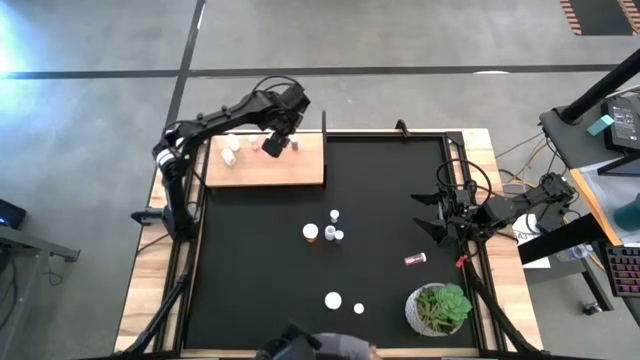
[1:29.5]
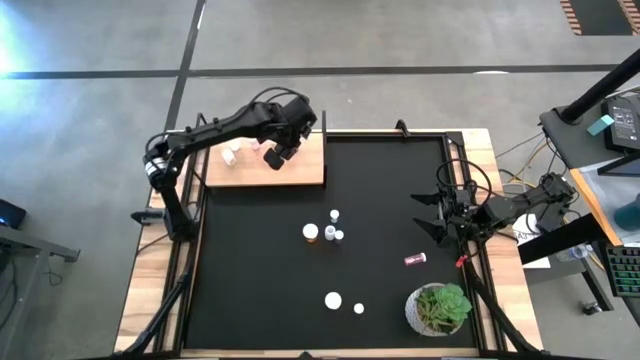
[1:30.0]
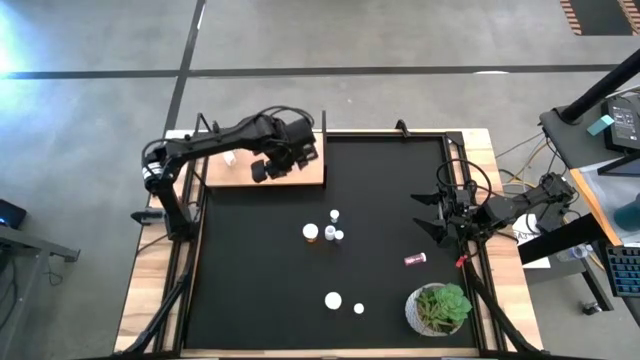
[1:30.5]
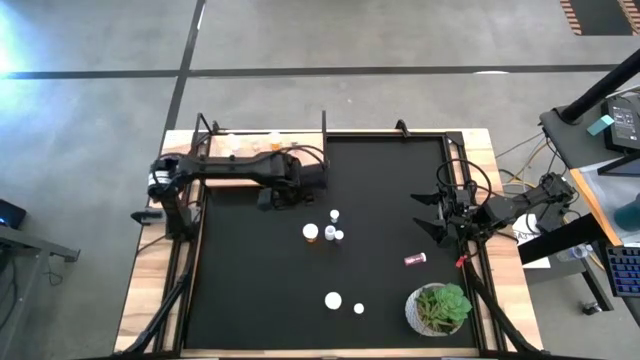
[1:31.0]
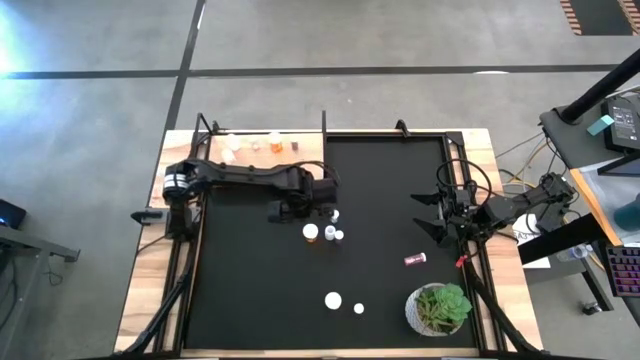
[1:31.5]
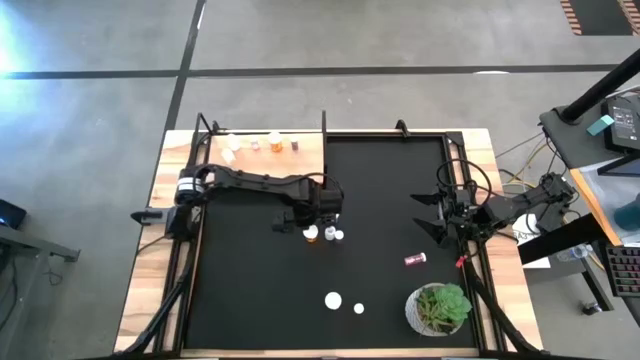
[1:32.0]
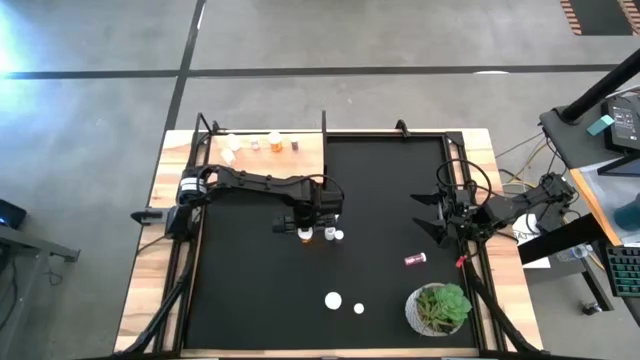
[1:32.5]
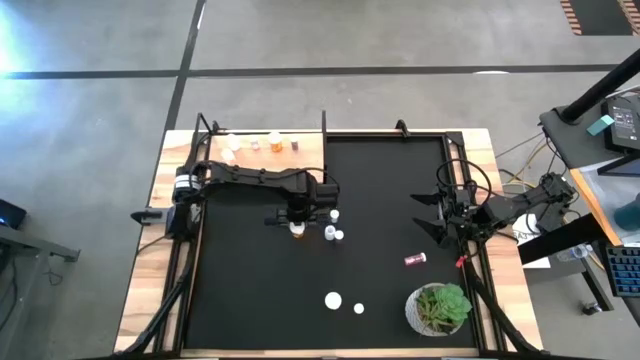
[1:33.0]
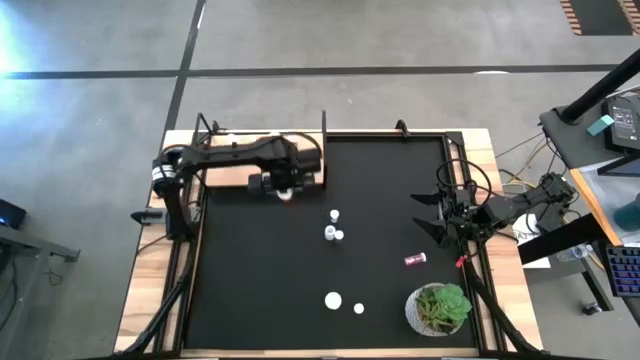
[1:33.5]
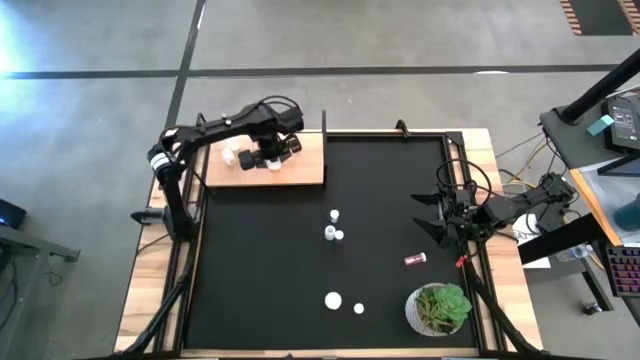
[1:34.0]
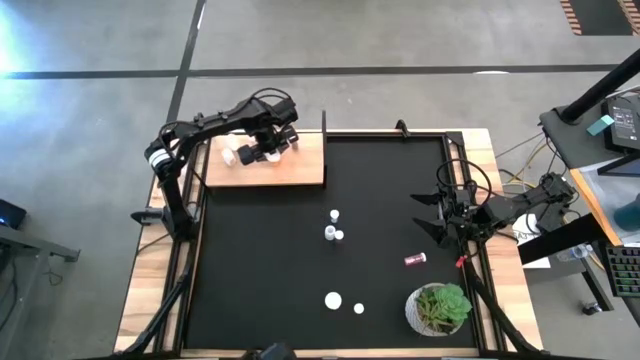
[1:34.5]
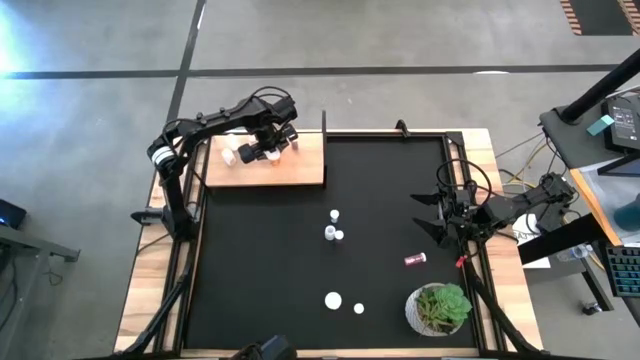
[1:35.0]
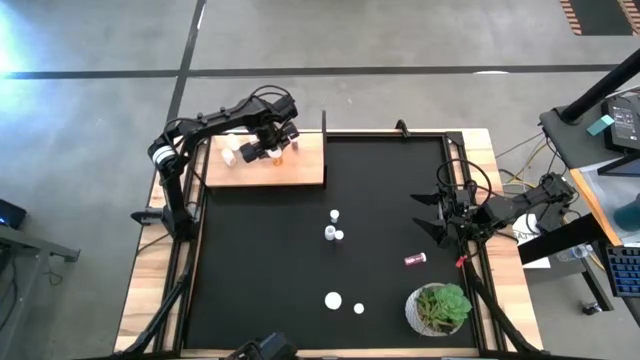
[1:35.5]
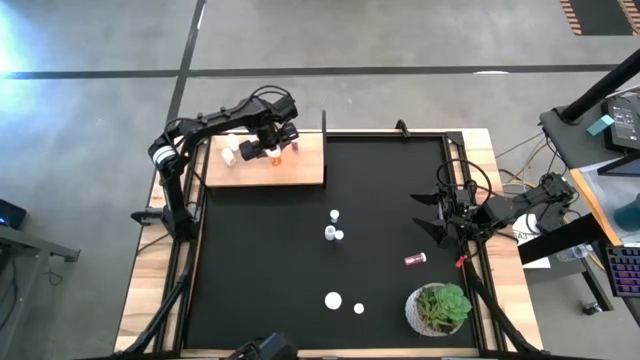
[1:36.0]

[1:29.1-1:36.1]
Task: Pick and place medicine bottles onto shelf by color
Put the top orange pill bottle on the shelf aligned with the other orange pill bottle

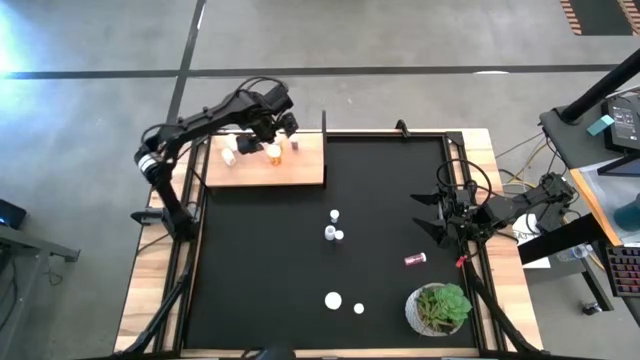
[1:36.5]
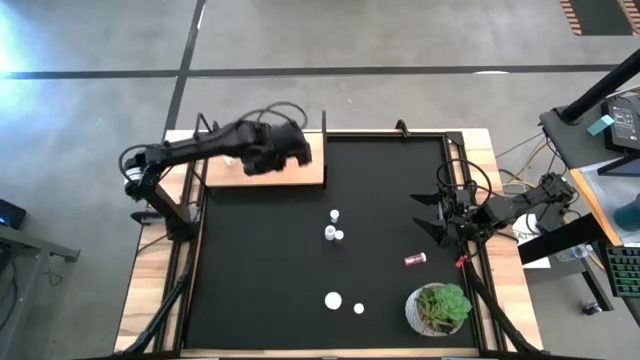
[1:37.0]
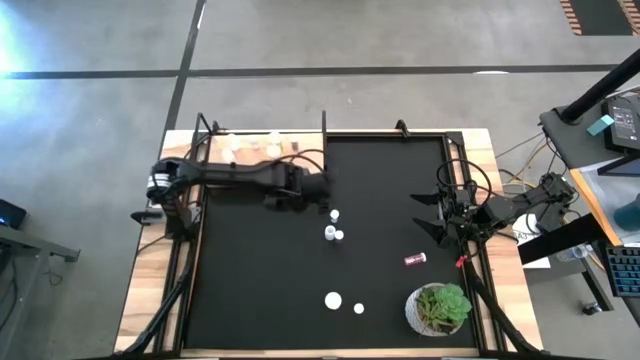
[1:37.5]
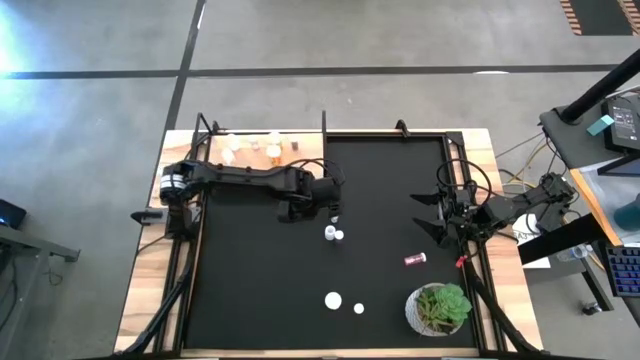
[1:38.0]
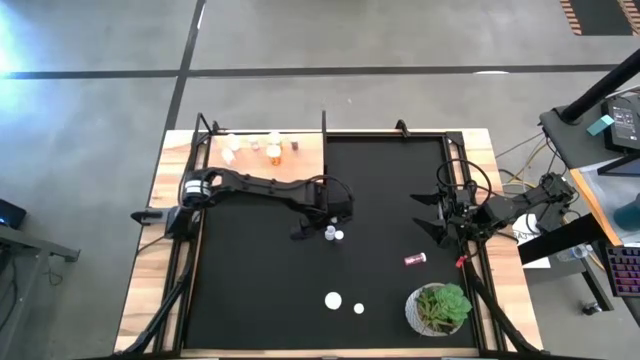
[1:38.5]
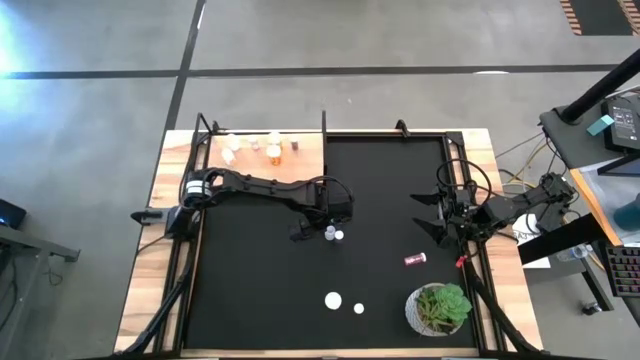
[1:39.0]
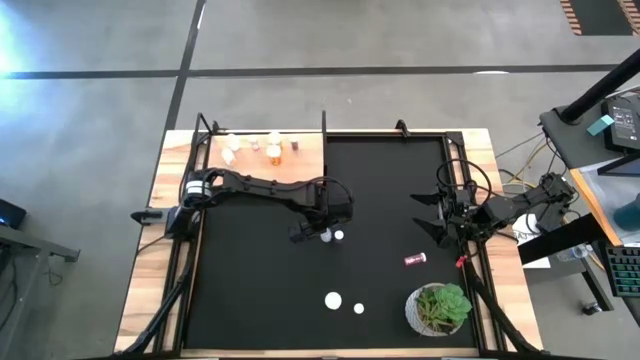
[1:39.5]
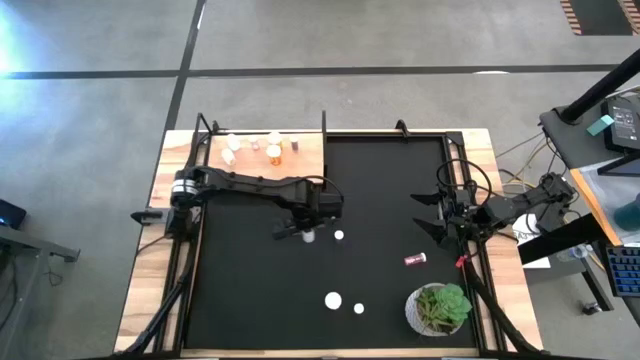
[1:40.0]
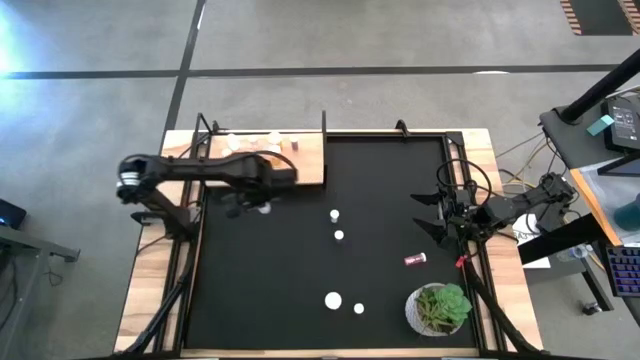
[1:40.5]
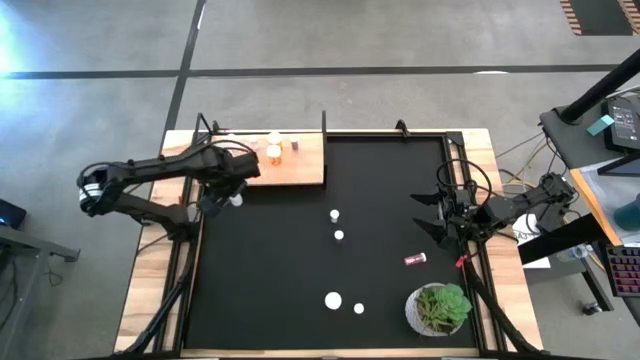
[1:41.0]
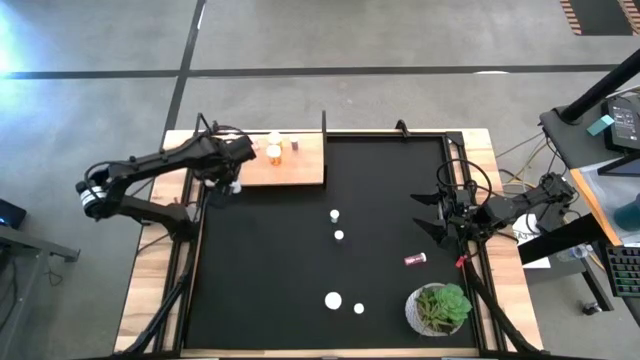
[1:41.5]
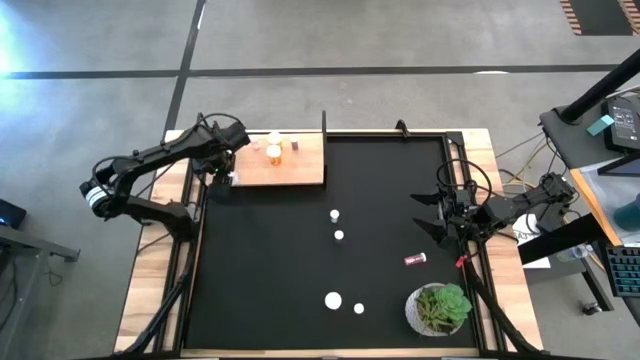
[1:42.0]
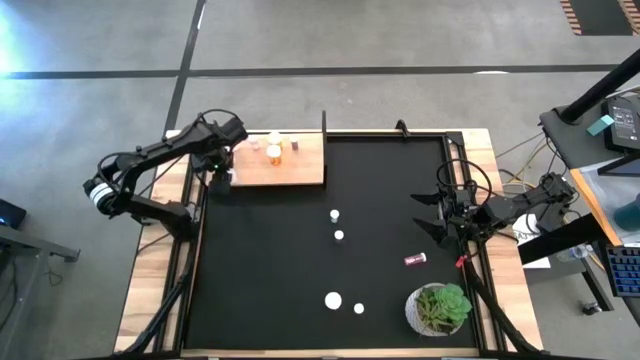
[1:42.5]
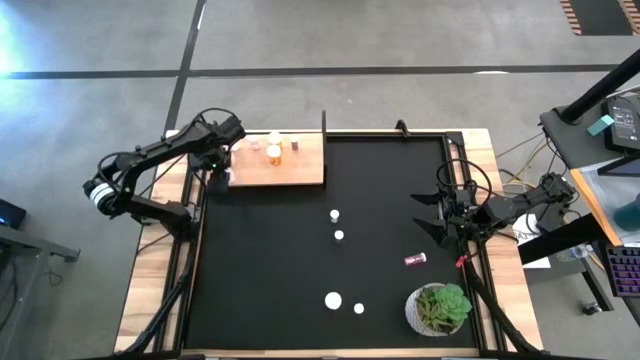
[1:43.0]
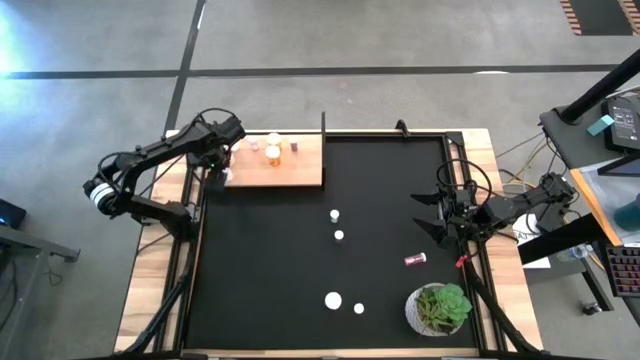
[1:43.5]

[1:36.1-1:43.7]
Put the white pill bottle on the shelf aligned with the other white pill bottles

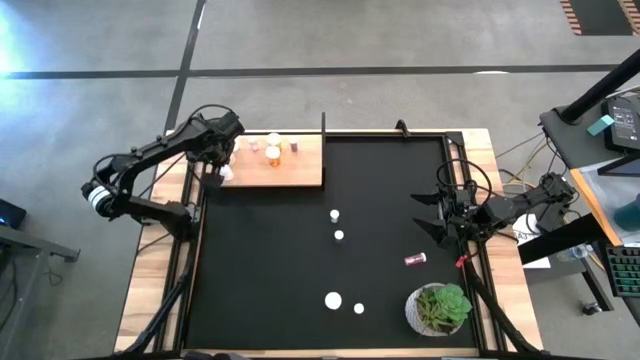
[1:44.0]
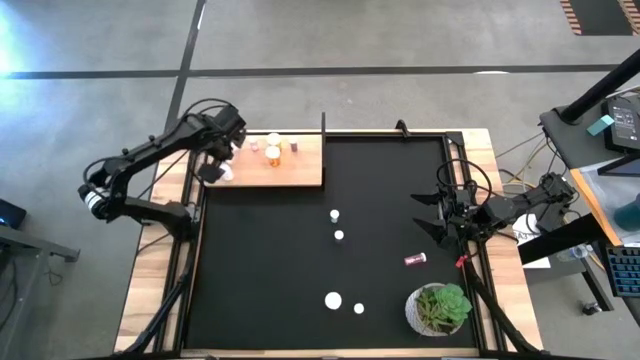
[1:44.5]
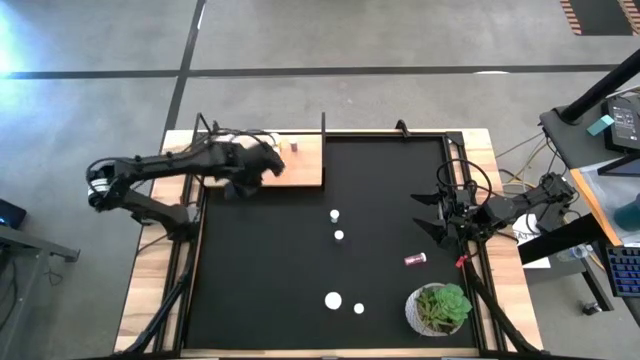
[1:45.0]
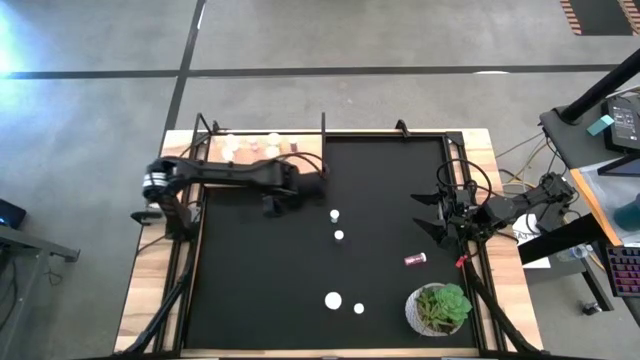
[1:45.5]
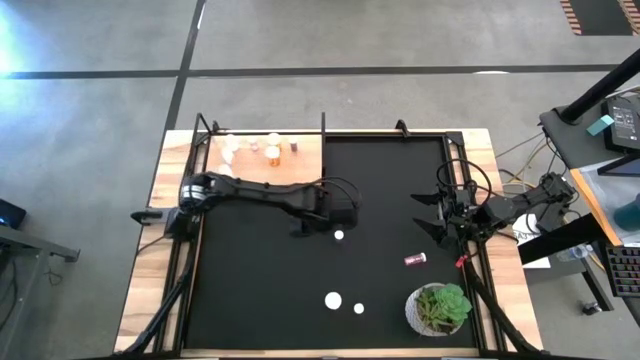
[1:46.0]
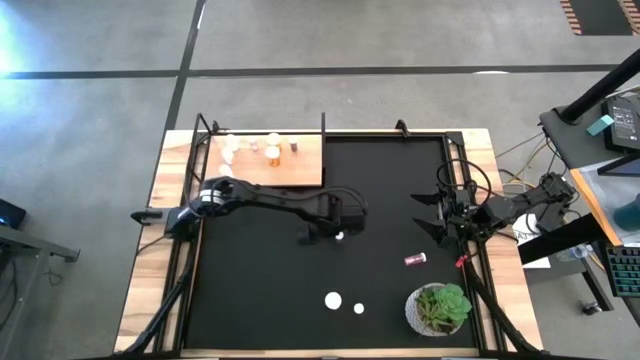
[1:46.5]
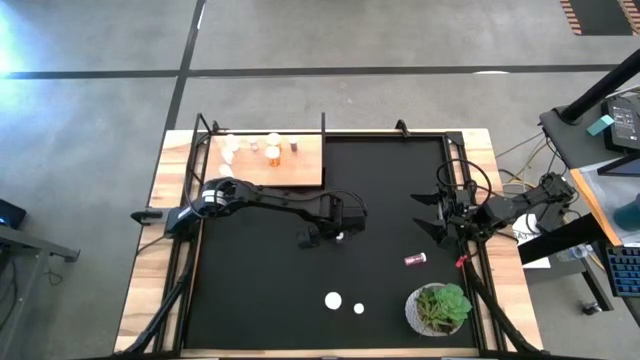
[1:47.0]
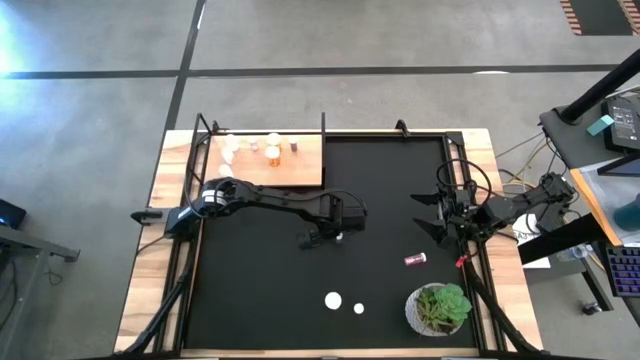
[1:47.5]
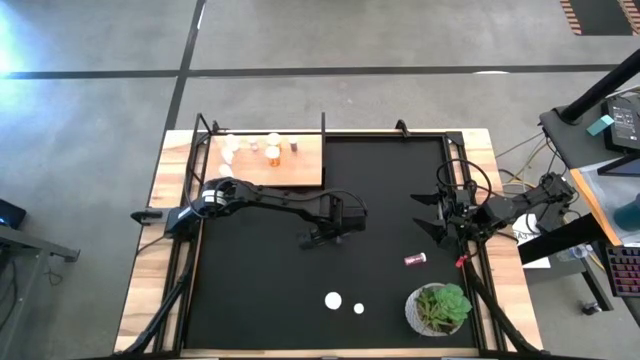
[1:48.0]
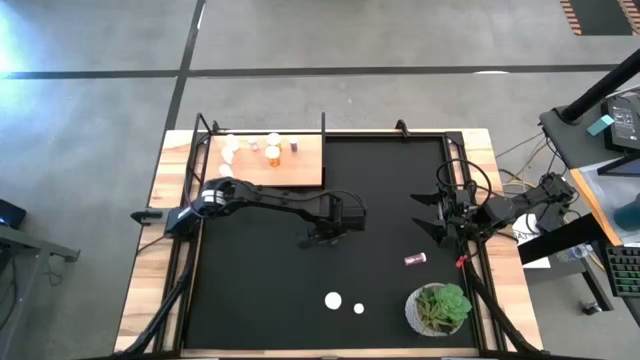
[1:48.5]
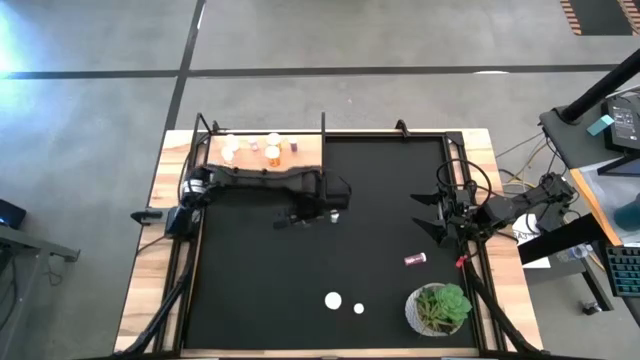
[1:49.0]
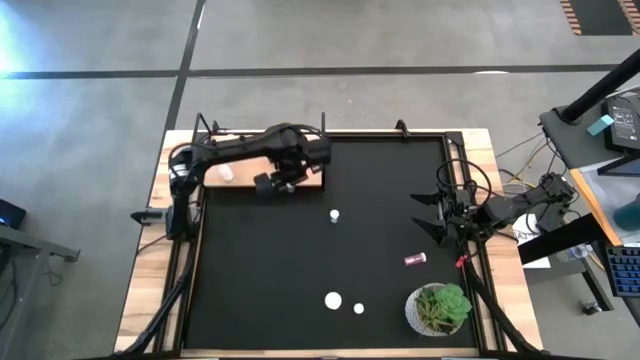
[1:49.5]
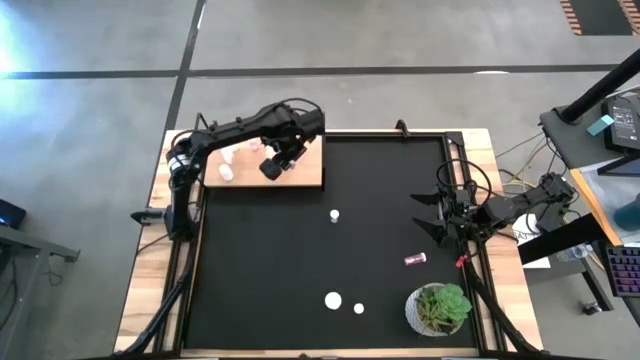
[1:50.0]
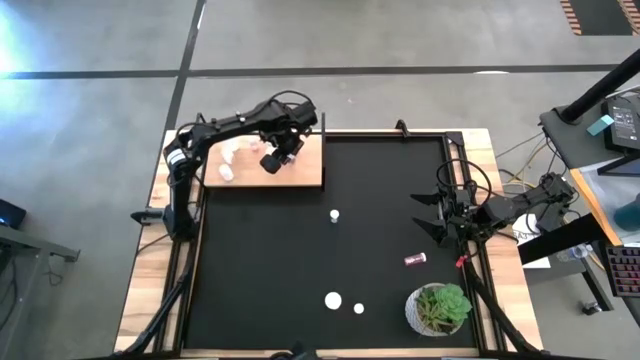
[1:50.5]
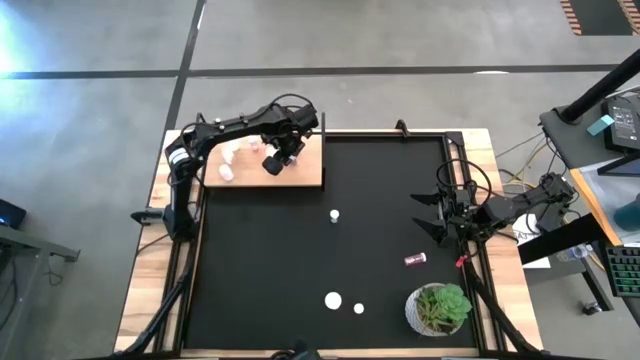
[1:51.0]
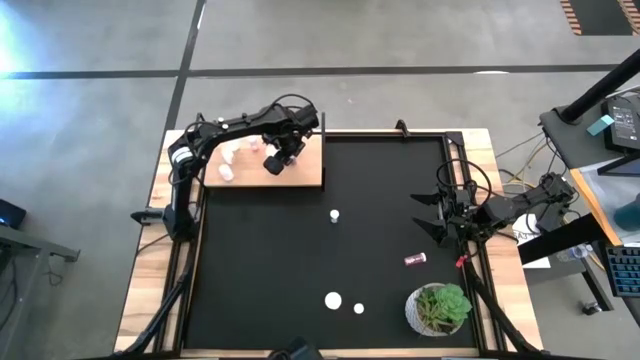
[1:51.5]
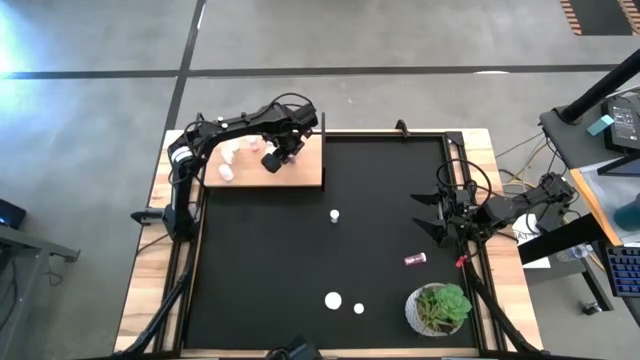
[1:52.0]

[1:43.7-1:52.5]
Put the bottom blue pill bottle on the shelf aligned with the other blue pill bottle
